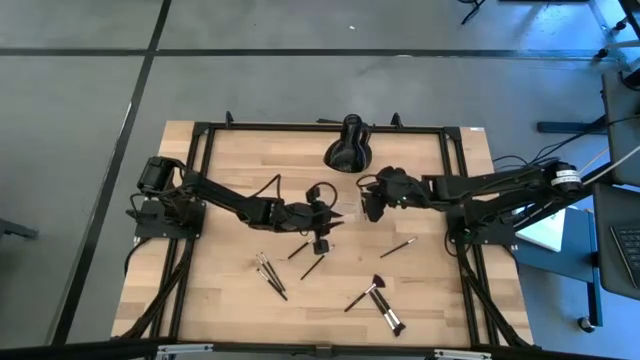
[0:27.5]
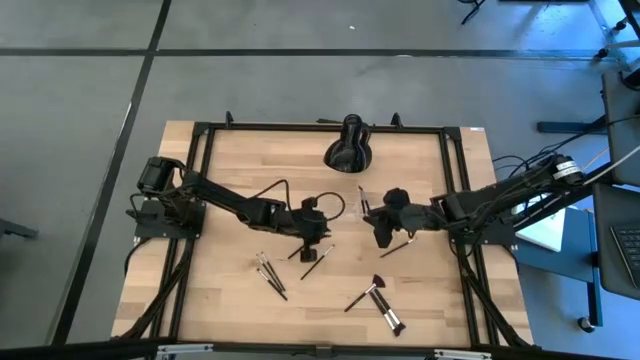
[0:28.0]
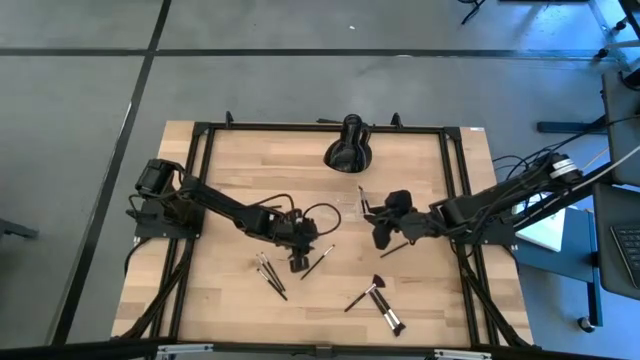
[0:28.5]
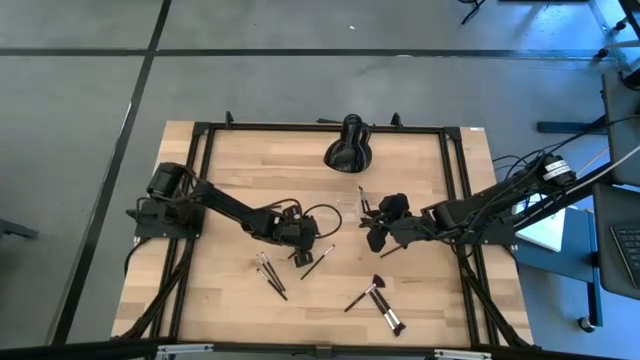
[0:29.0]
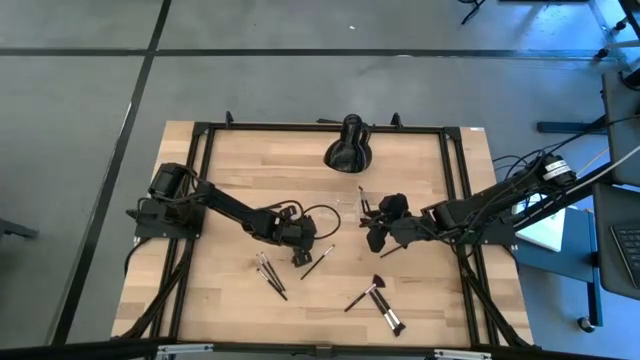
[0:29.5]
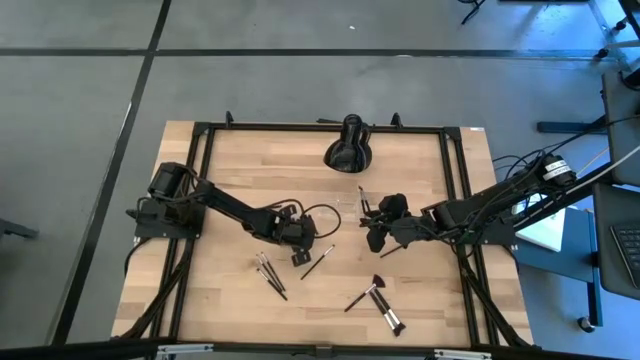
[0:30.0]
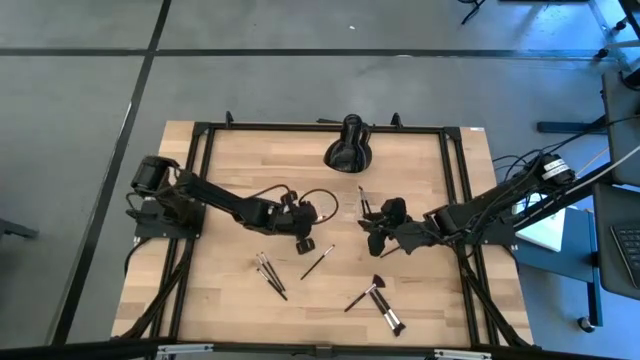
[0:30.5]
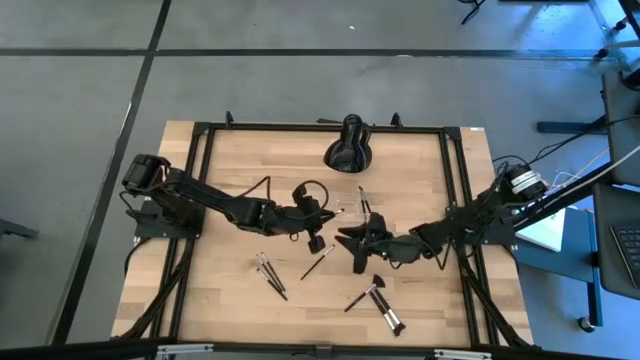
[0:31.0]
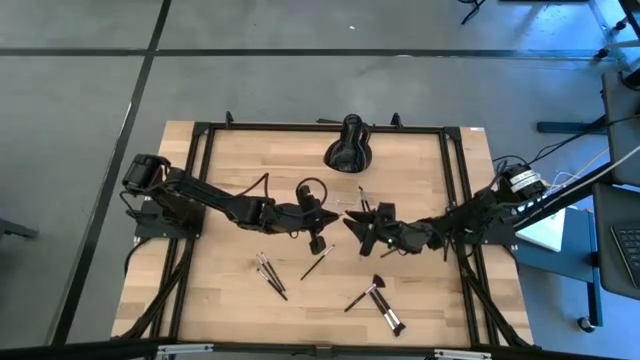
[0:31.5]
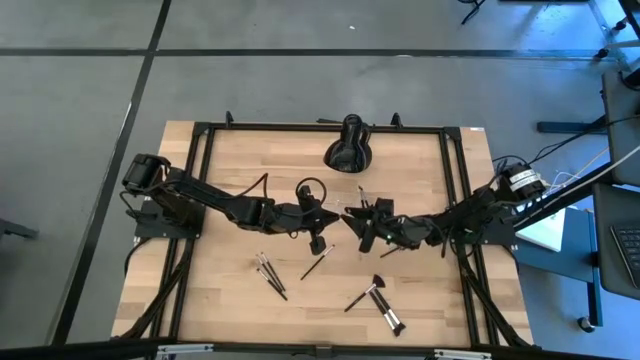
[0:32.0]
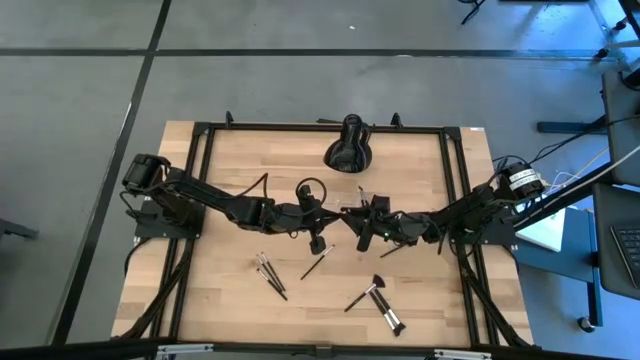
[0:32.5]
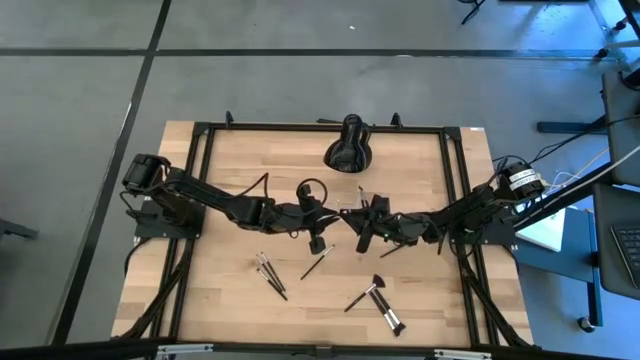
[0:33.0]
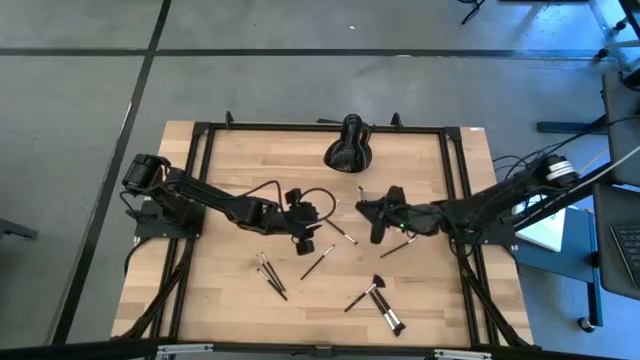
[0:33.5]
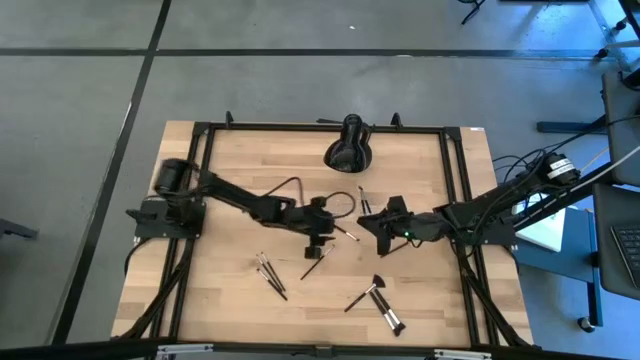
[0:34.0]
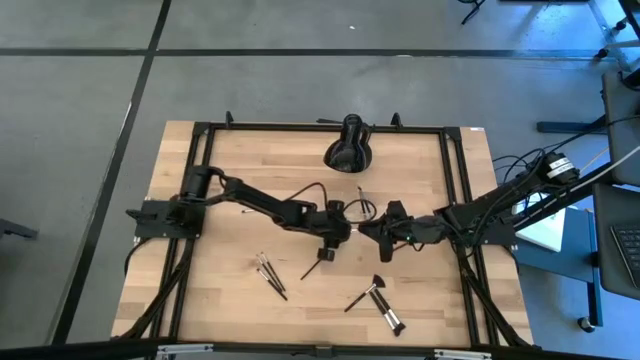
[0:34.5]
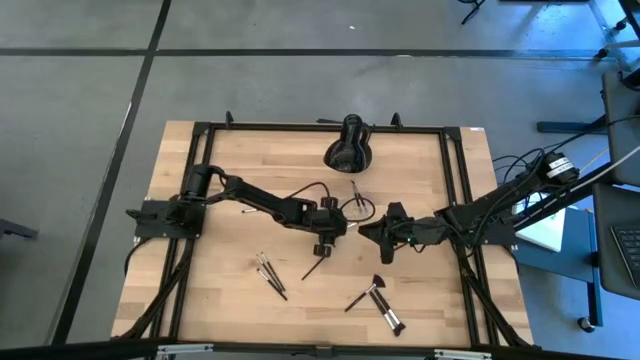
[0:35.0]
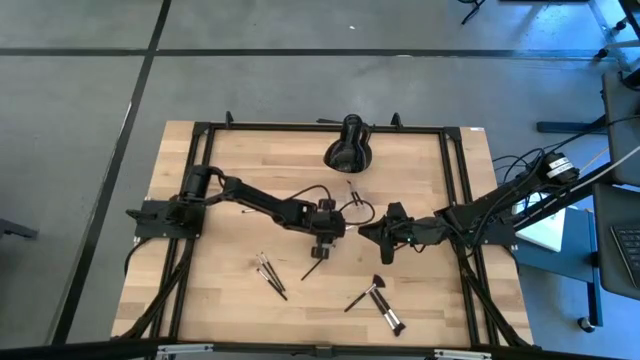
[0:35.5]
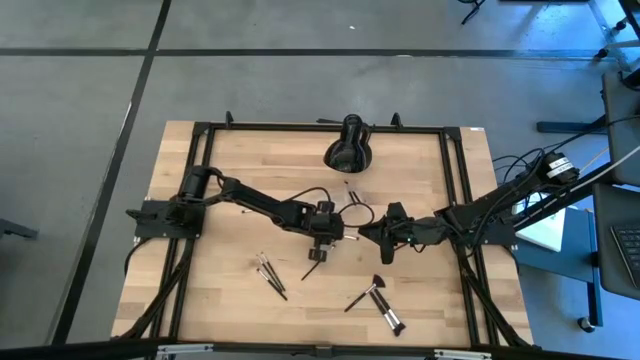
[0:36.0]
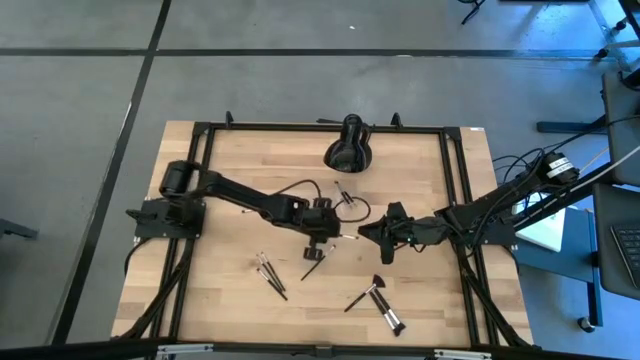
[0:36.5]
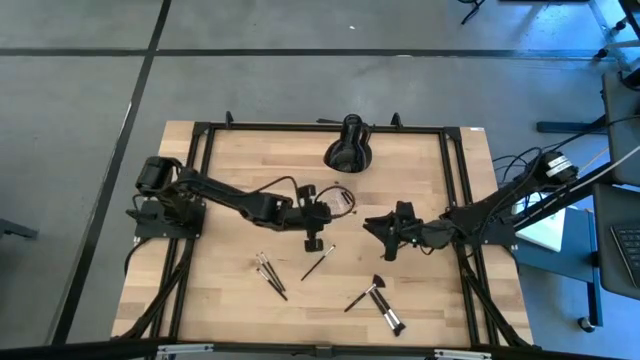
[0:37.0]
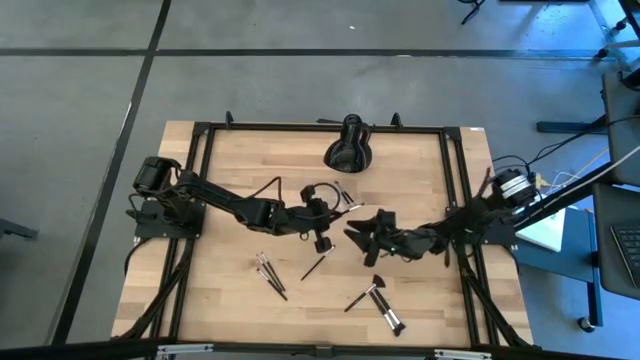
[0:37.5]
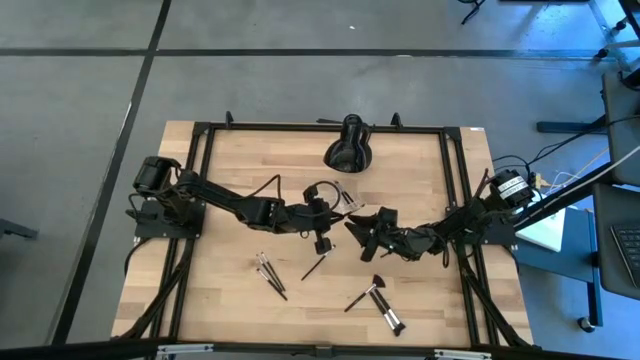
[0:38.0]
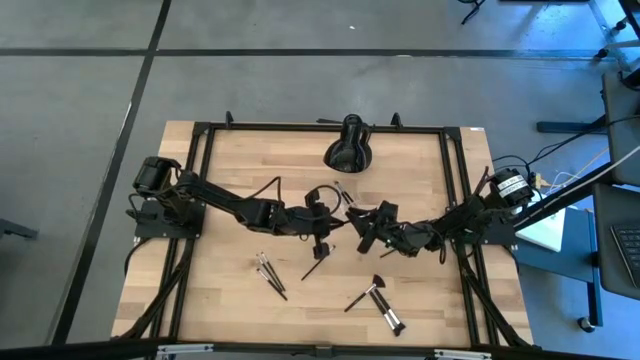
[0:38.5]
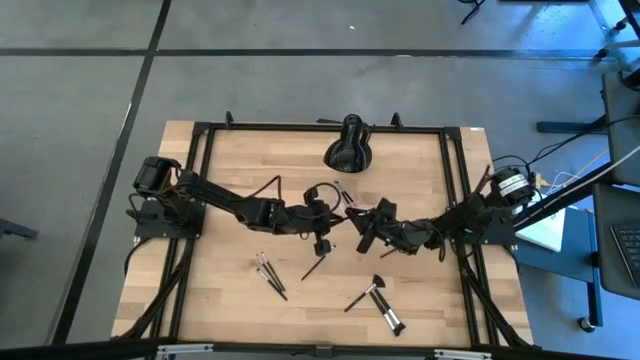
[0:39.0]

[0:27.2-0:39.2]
Task: Pick & Place Makeup Supplies
Put the makeup brush into the transparent organizer

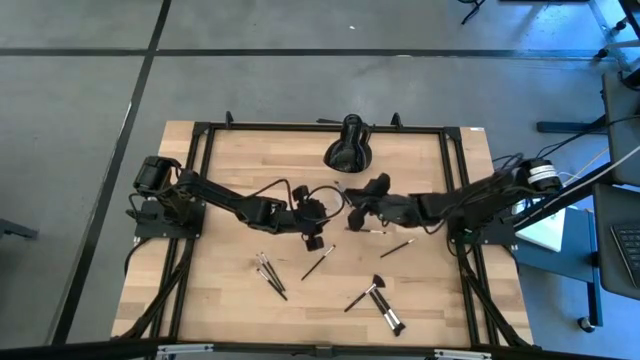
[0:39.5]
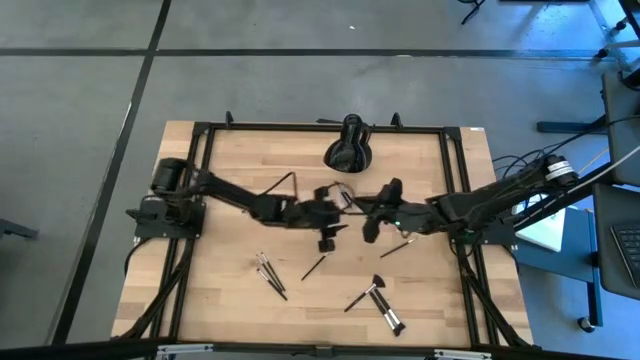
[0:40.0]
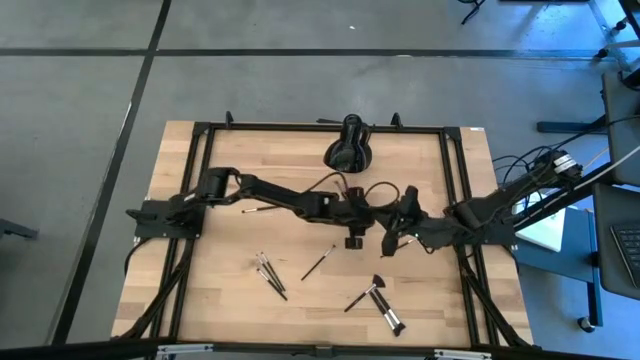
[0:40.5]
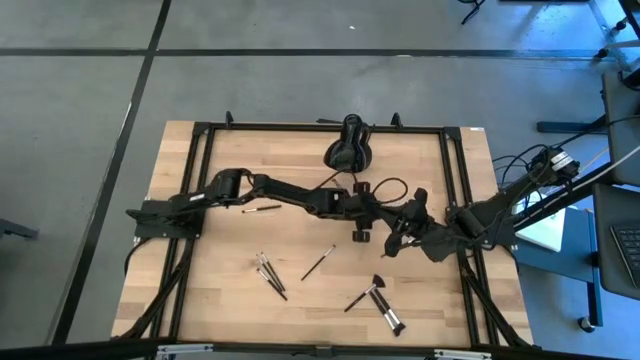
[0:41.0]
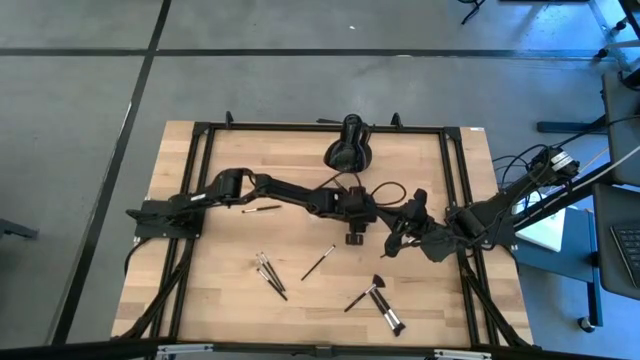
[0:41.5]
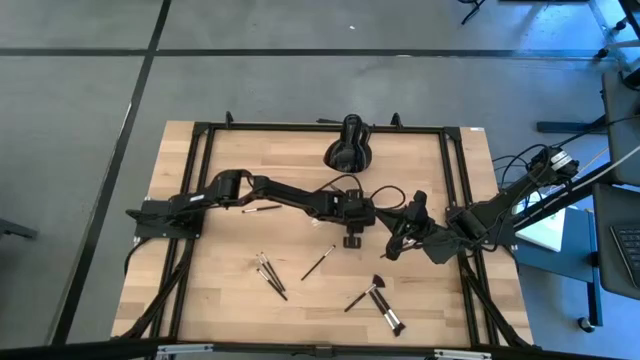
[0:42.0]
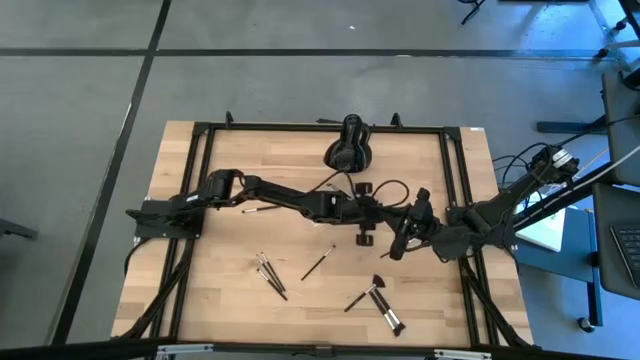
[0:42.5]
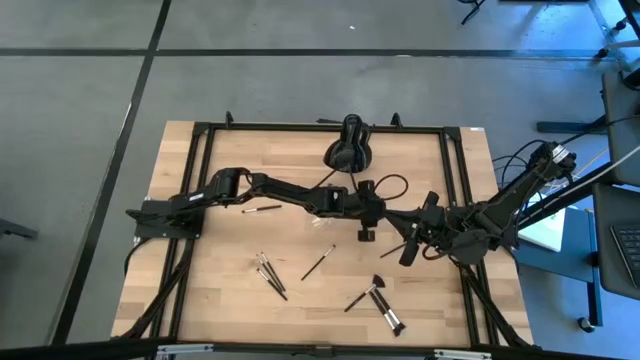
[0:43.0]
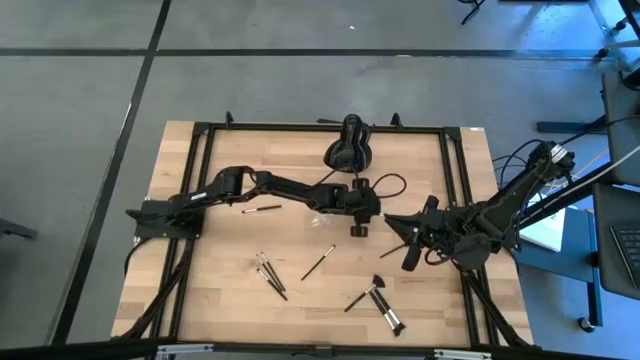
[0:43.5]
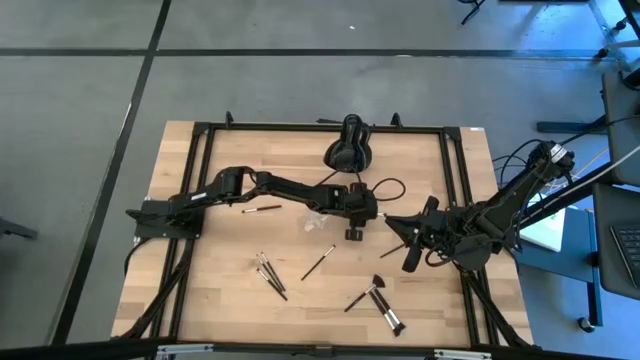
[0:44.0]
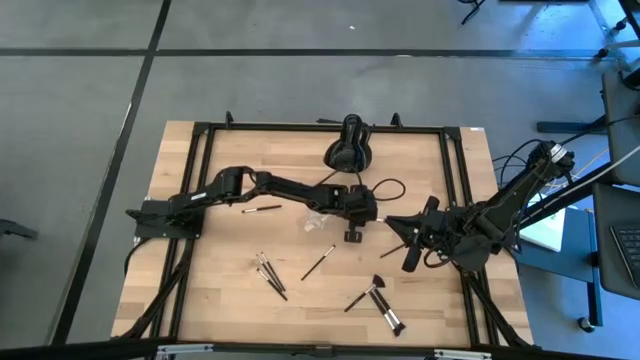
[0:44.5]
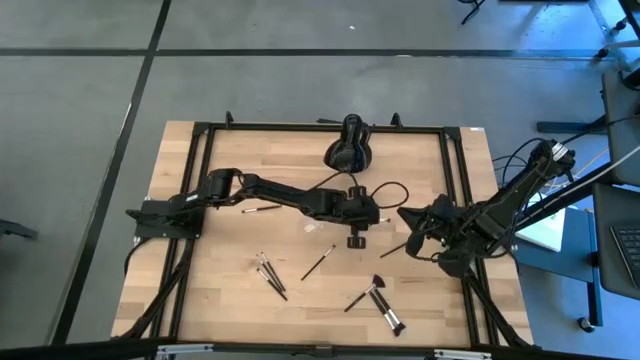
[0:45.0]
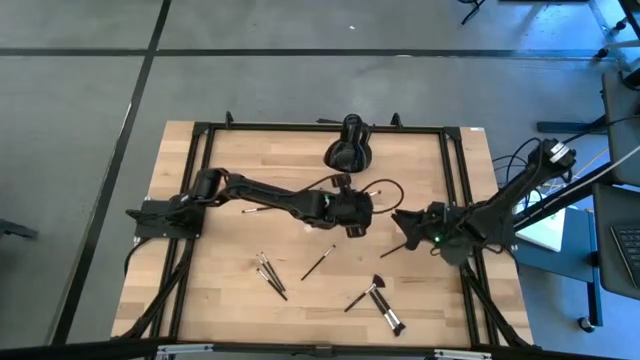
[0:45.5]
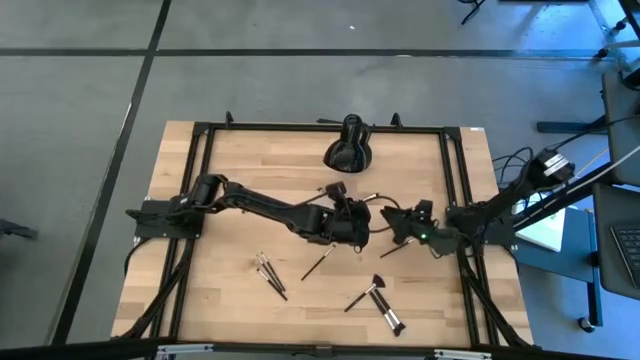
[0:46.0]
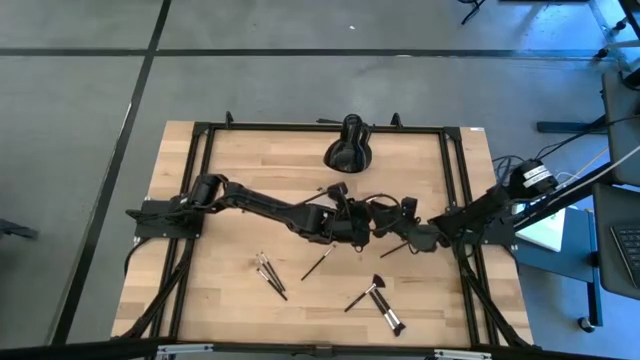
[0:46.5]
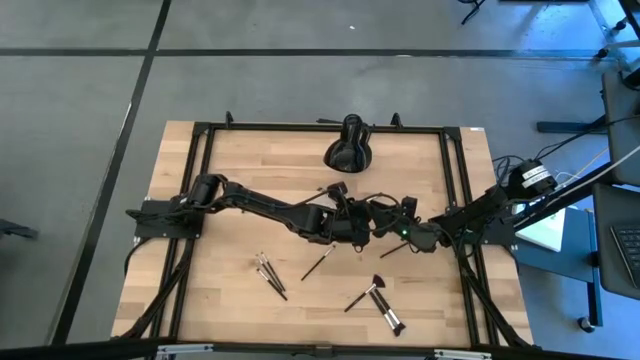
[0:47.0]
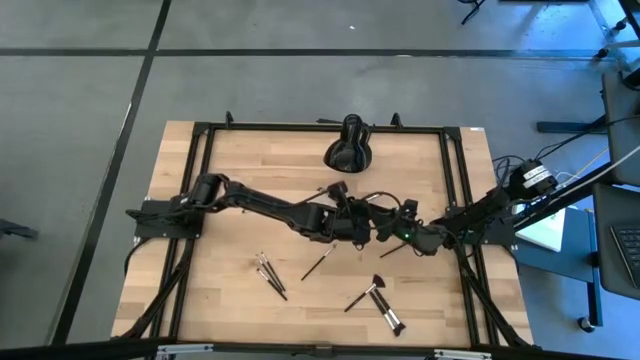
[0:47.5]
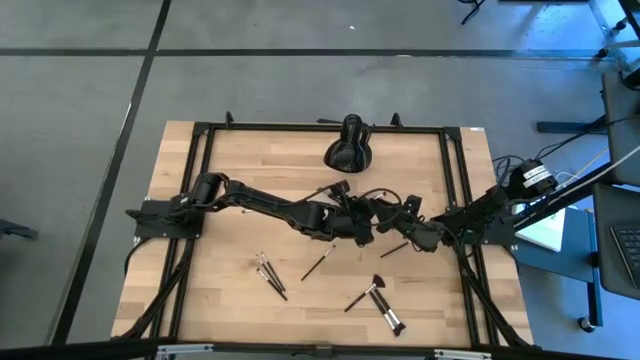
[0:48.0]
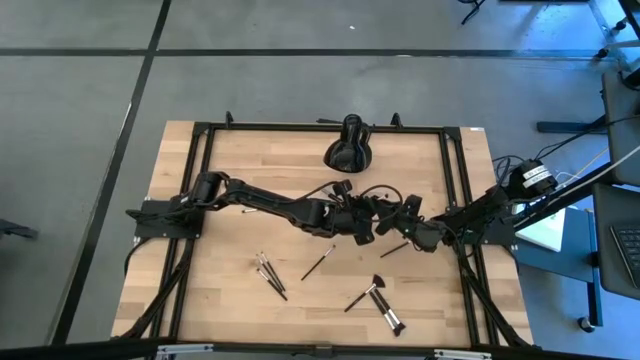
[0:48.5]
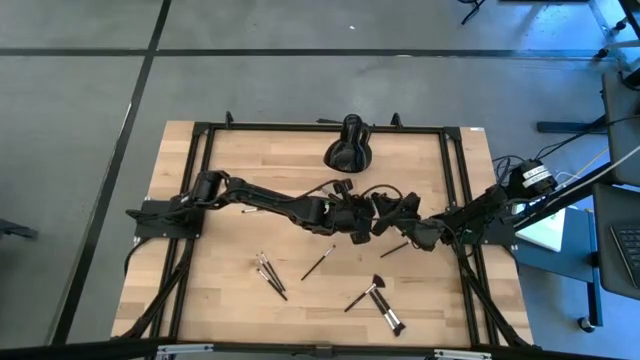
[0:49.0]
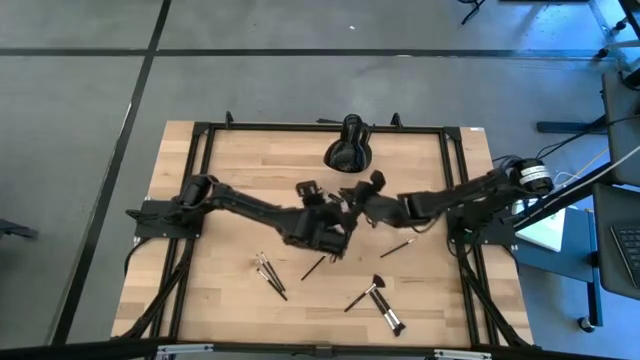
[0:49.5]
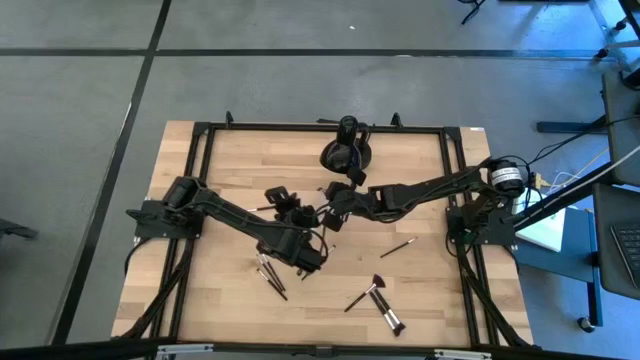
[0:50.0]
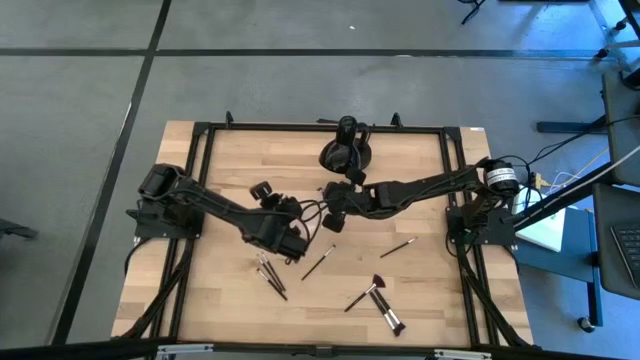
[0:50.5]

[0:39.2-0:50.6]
Put the makeup brush into the transparent organizer
